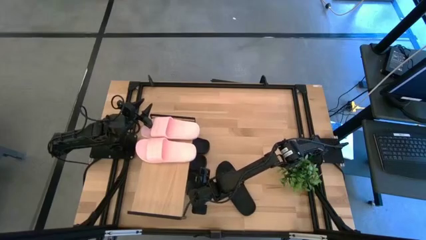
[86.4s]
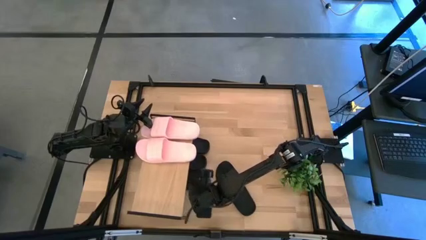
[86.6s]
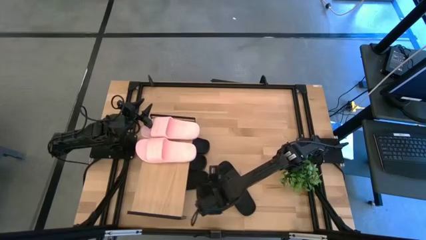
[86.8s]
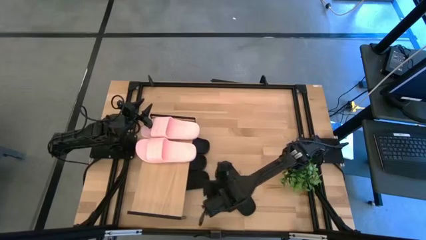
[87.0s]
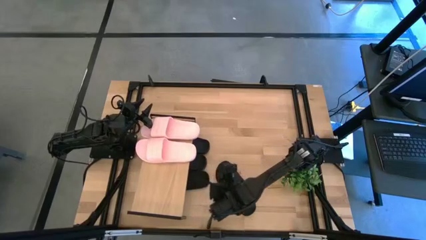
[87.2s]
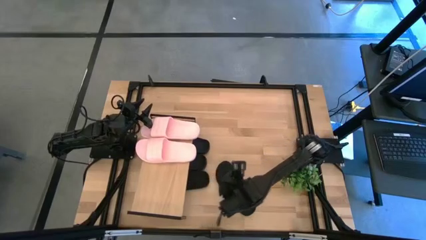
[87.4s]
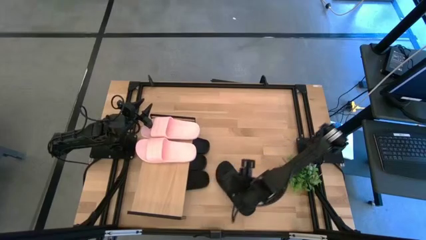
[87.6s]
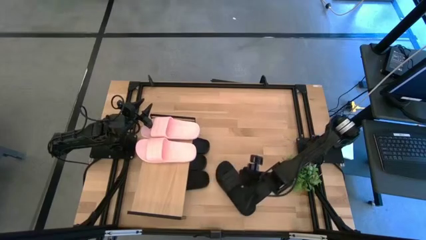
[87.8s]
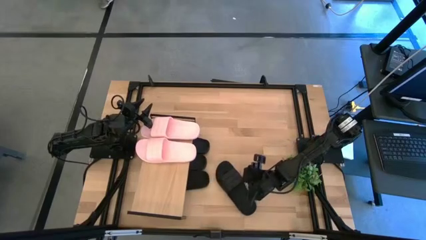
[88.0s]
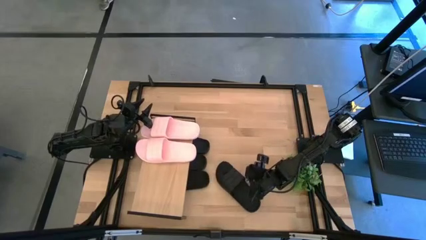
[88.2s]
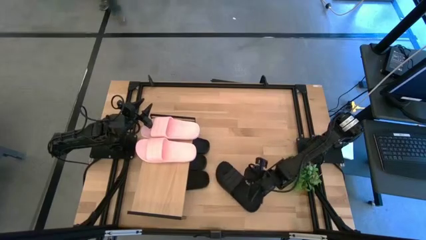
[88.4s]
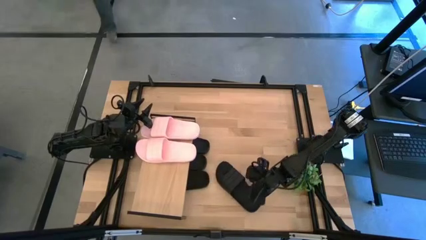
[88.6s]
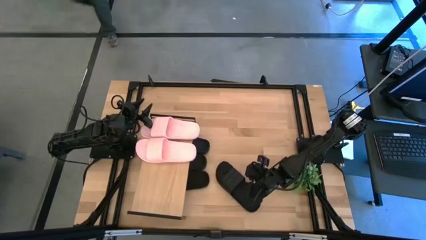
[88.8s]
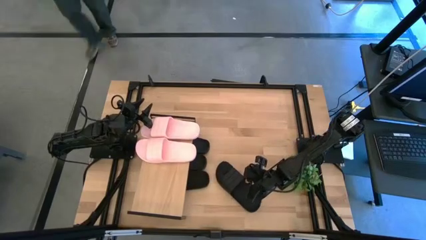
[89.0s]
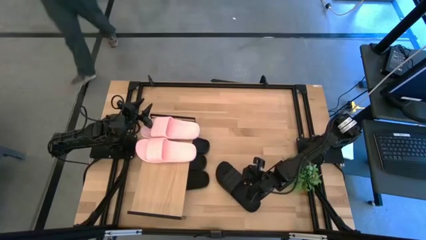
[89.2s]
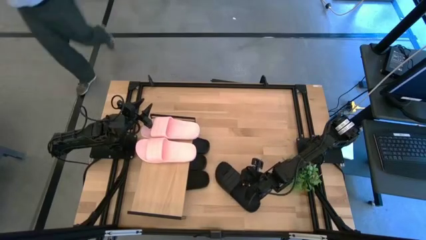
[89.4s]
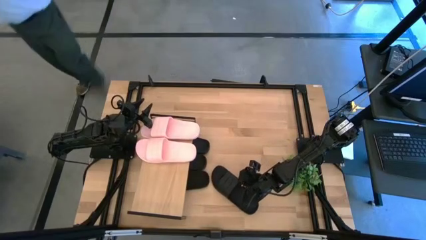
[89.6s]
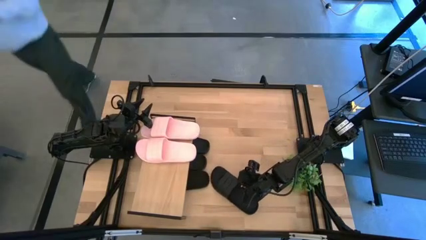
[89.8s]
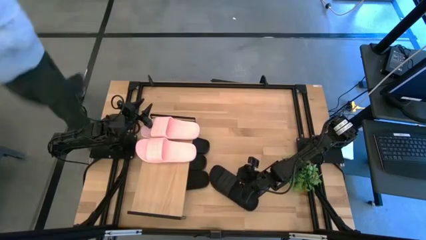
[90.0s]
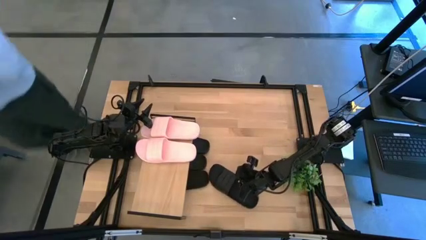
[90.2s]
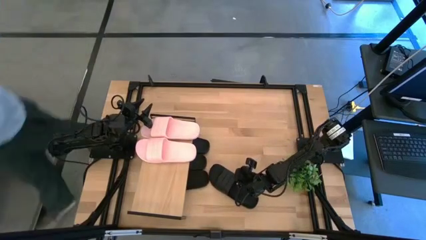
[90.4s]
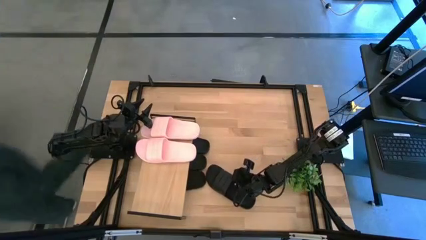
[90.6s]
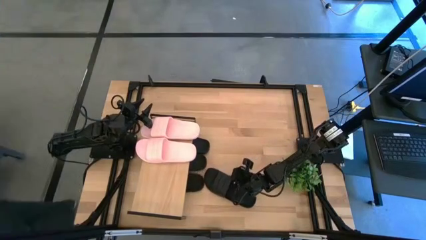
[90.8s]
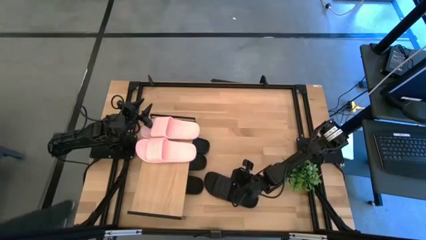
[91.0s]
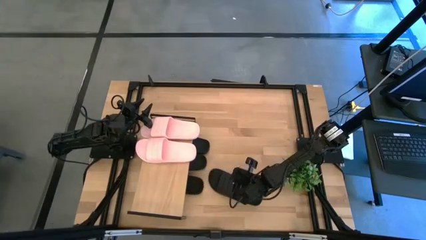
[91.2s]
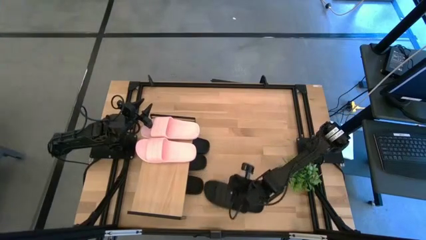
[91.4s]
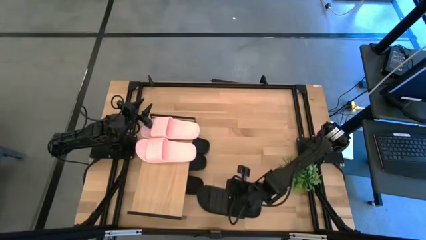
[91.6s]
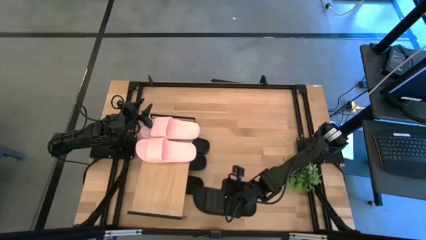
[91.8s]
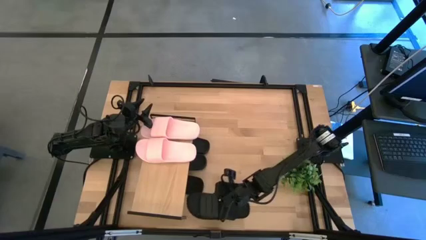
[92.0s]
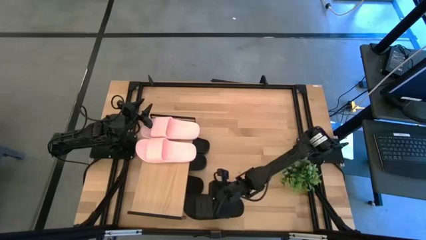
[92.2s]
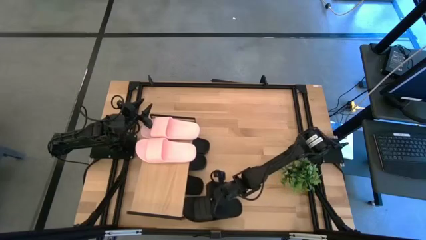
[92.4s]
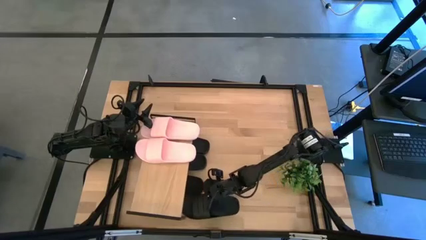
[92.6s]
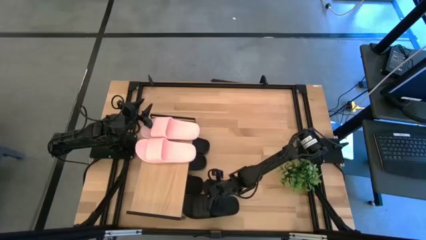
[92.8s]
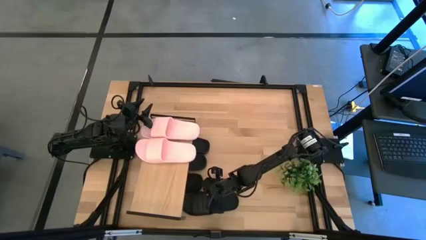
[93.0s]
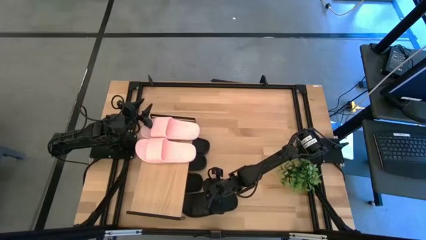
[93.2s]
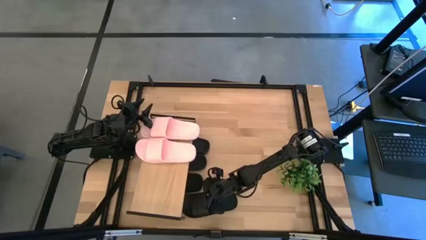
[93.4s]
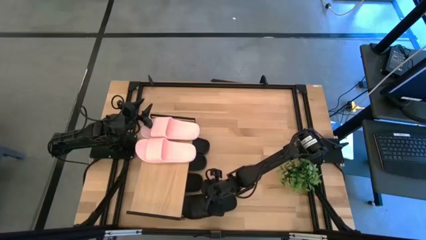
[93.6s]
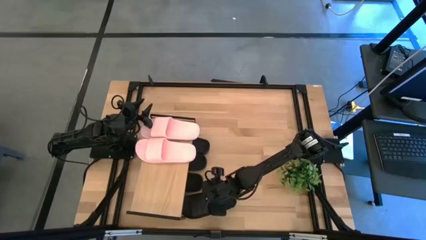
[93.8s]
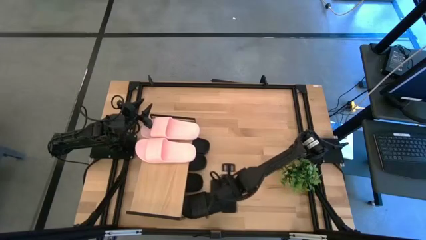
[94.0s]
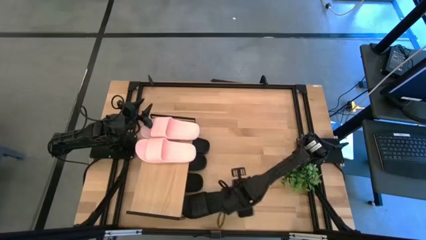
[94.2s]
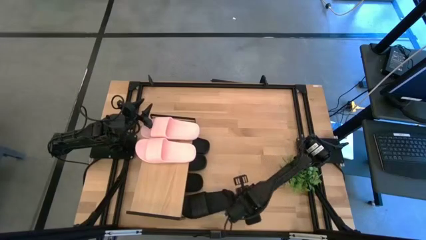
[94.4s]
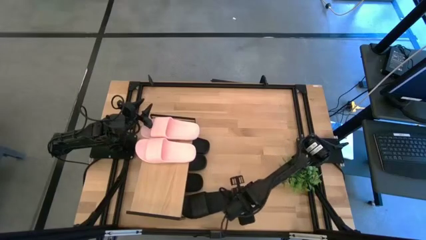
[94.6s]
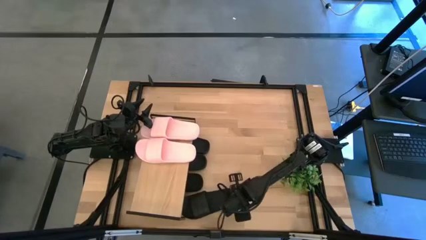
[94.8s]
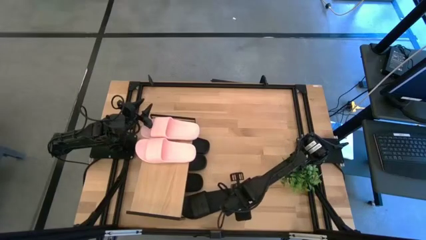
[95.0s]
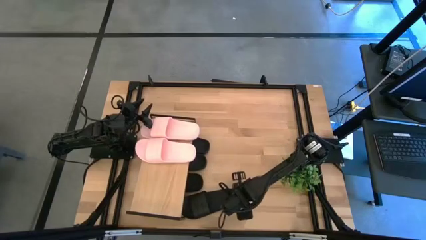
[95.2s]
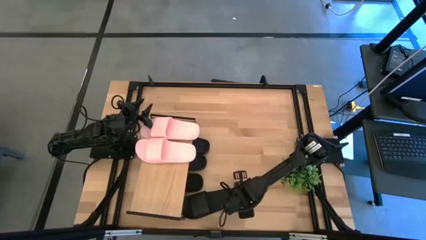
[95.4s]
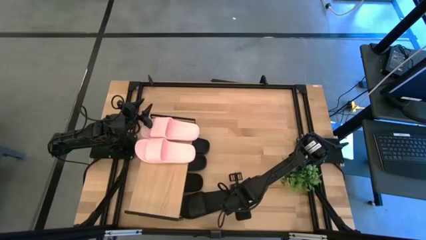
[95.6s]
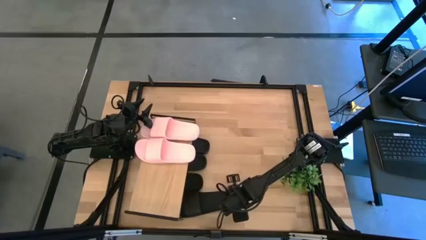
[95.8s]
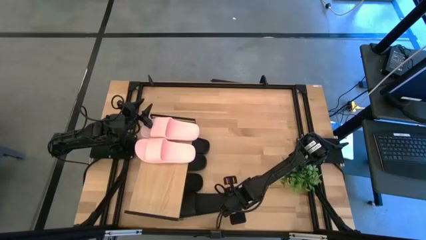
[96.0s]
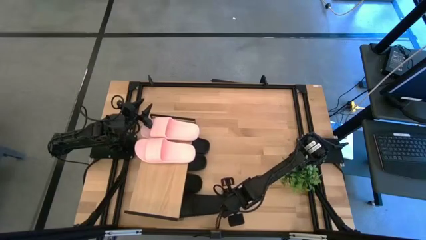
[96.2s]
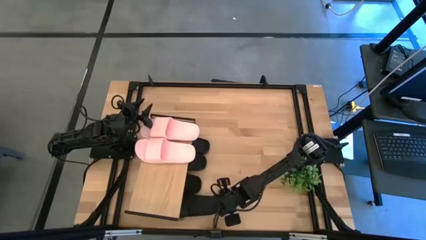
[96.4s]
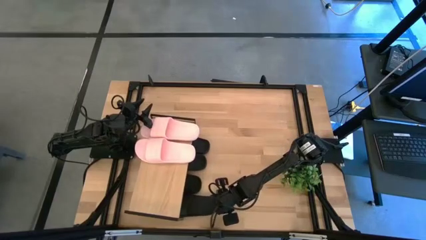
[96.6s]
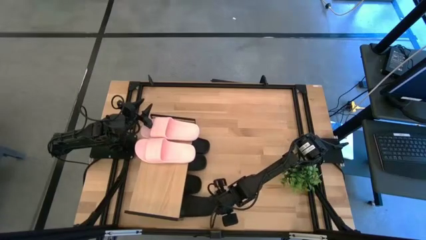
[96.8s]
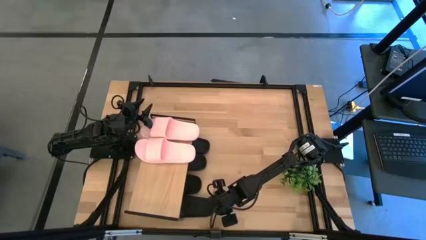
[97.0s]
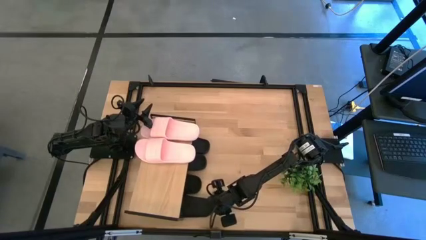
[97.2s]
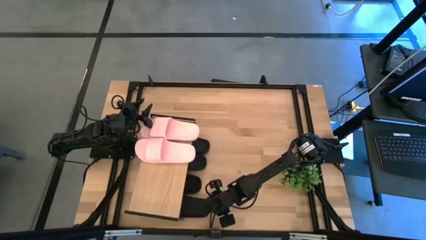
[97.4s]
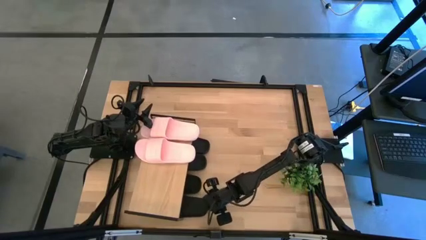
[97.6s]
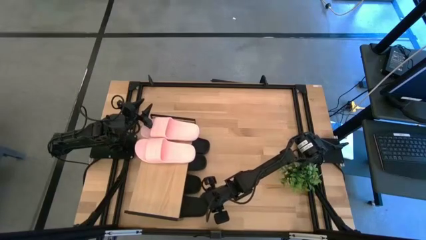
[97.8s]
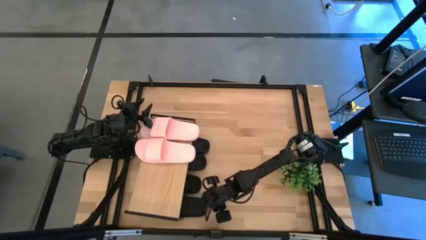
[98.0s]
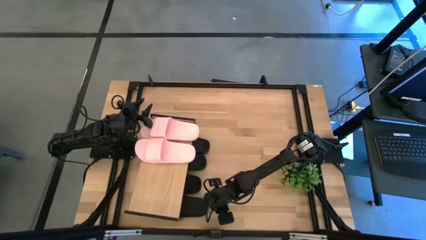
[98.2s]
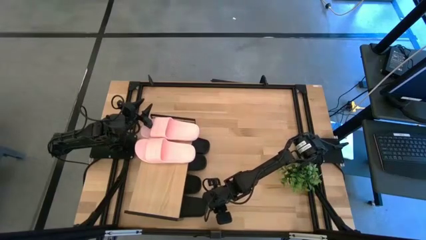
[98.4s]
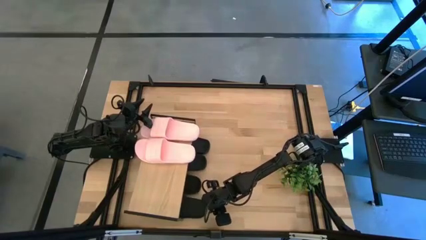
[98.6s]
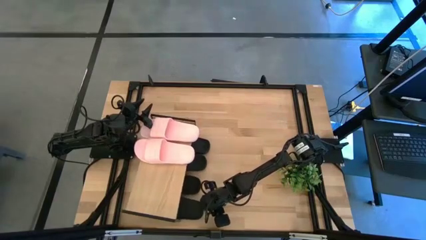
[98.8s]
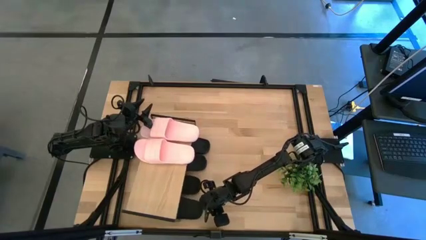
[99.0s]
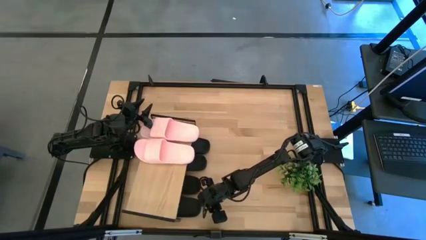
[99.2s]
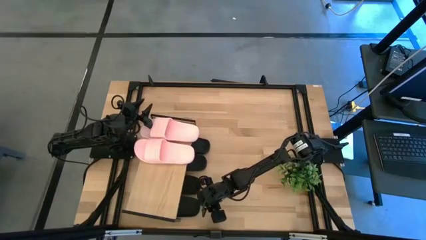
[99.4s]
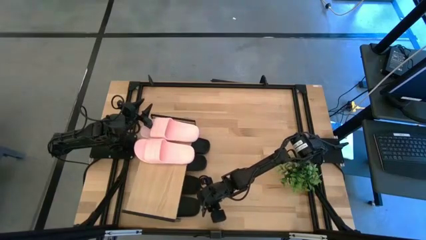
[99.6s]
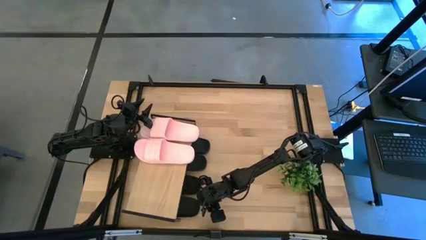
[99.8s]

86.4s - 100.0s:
Task: Pick and place slides into the shelf
Put the black slipper under the shelf

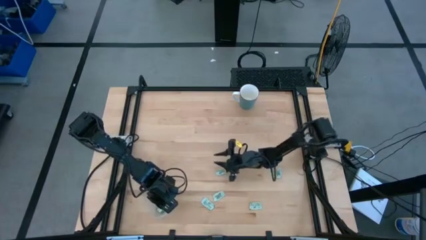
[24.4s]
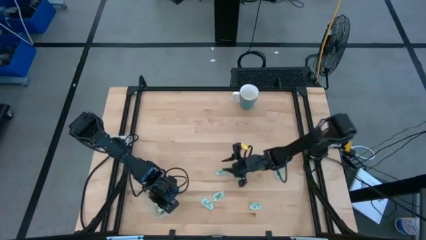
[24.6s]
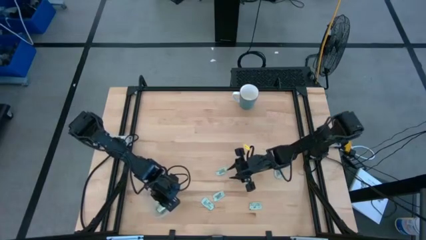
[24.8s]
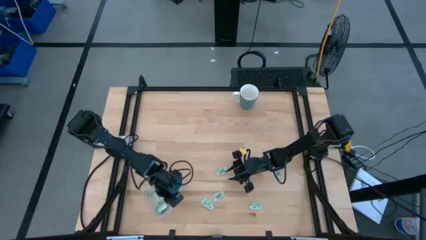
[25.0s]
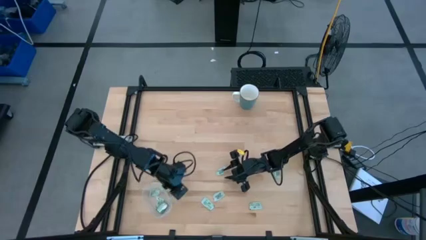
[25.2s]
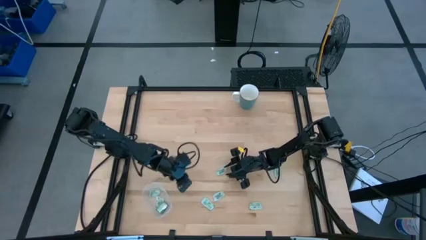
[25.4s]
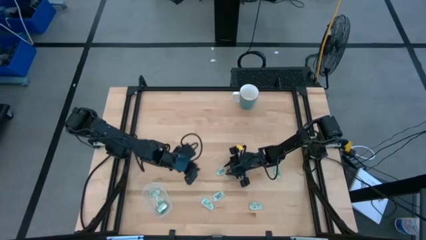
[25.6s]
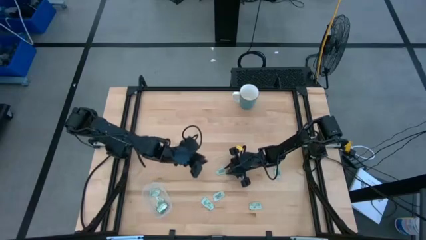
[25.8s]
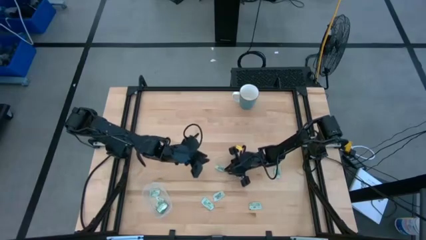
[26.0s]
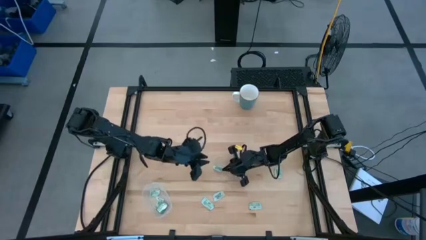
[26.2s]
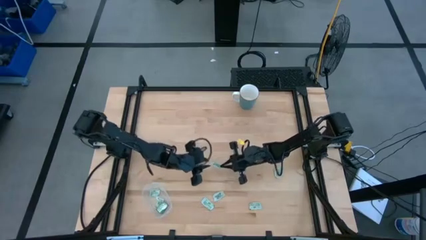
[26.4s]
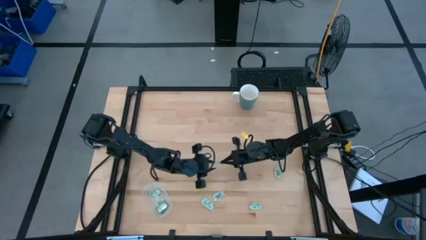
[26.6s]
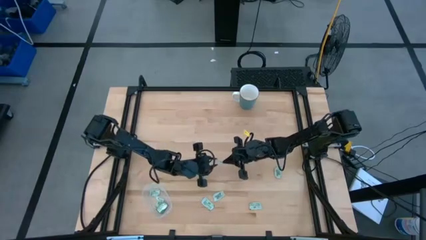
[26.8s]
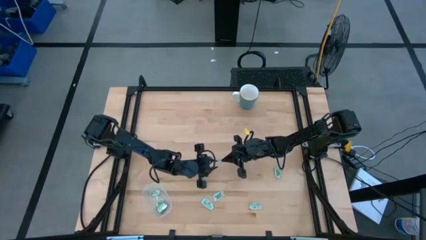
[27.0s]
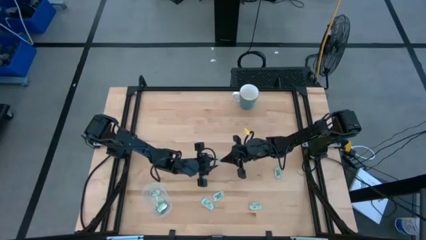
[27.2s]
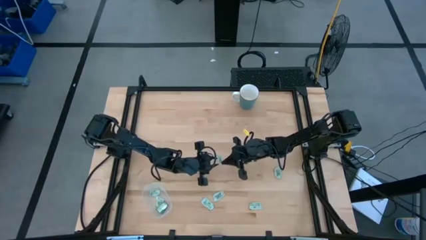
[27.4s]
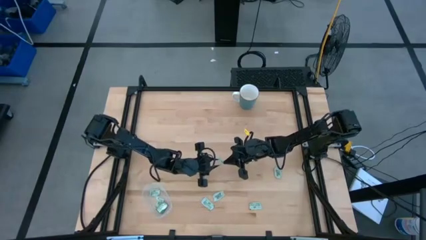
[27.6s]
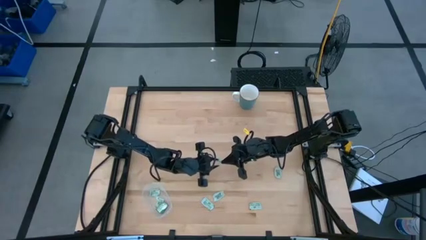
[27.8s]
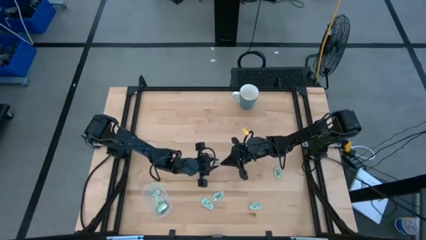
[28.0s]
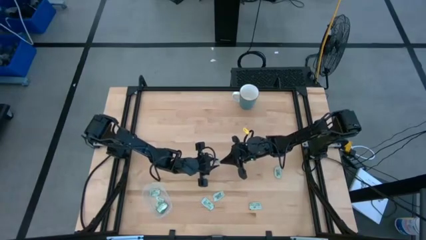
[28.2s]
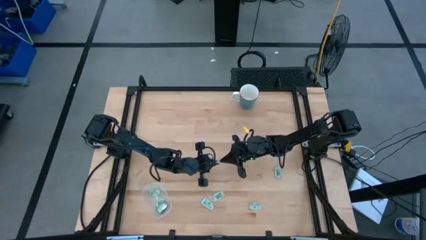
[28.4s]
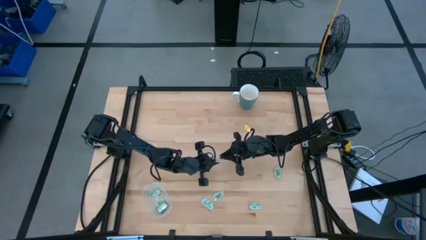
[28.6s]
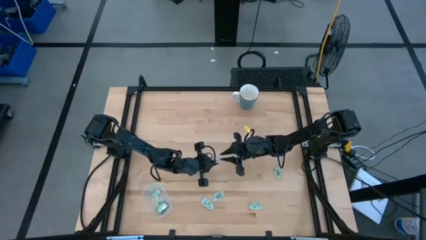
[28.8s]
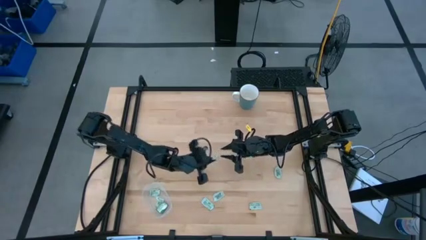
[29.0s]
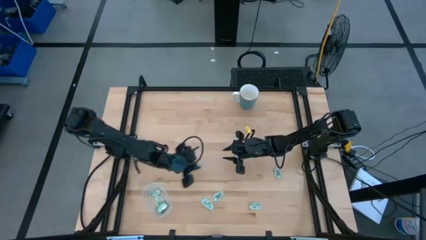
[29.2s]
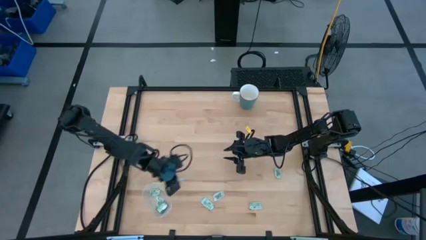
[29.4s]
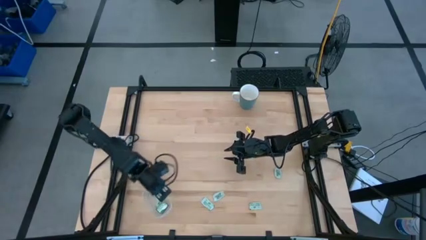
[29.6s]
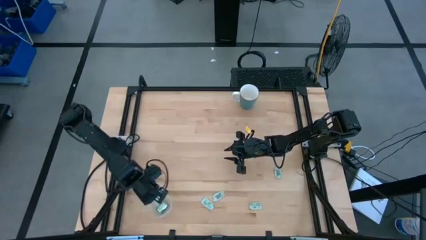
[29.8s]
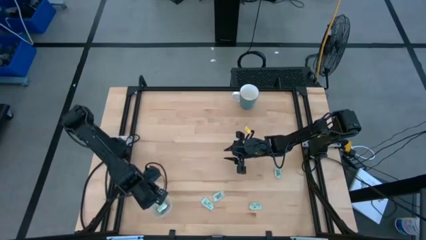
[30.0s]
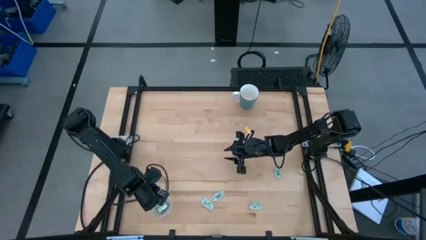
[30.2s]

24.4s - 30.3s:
Task: Pick and place Stevia / Truvia into bins
Put the stevia packet into the transparent container
